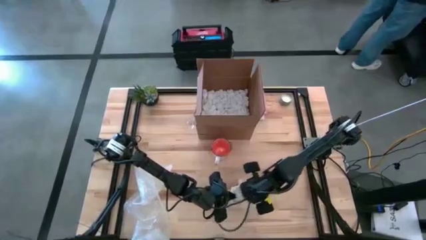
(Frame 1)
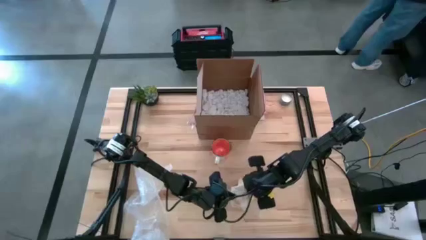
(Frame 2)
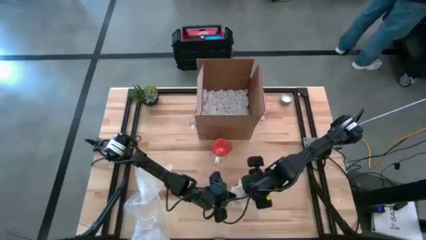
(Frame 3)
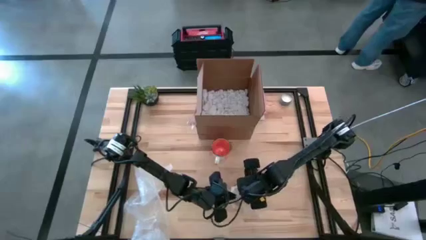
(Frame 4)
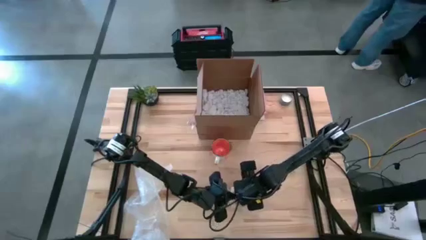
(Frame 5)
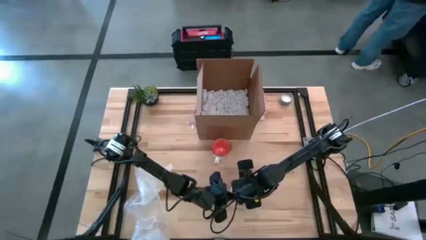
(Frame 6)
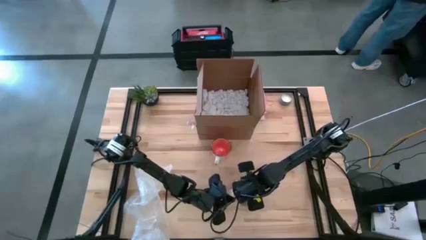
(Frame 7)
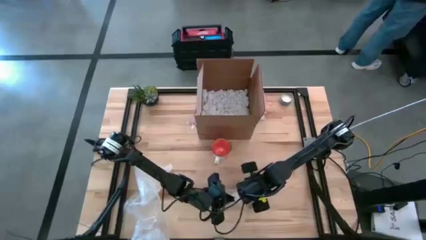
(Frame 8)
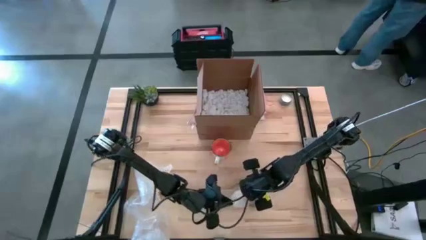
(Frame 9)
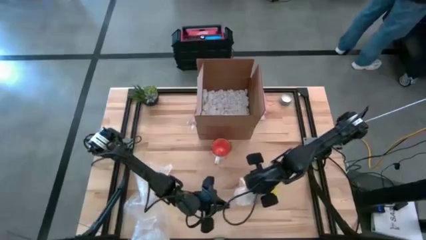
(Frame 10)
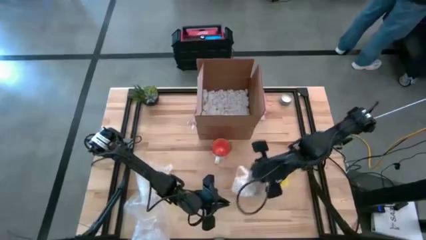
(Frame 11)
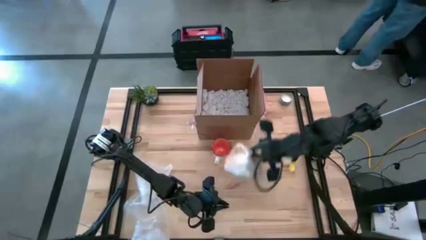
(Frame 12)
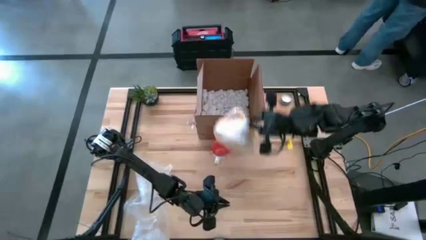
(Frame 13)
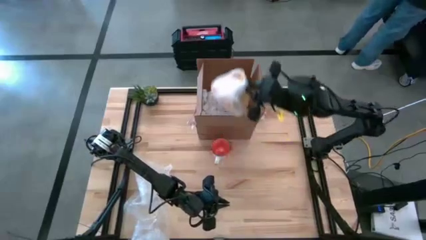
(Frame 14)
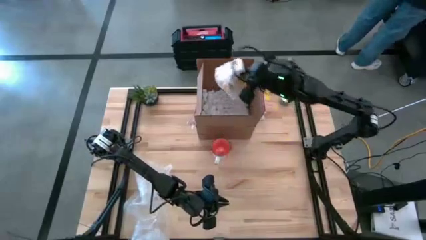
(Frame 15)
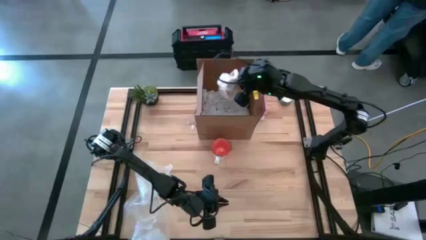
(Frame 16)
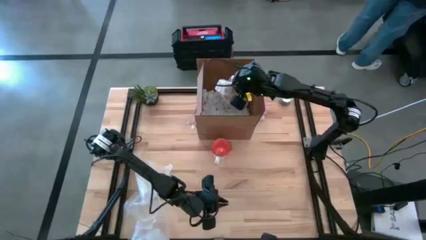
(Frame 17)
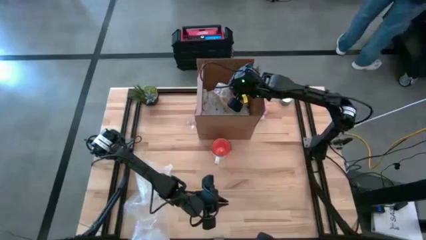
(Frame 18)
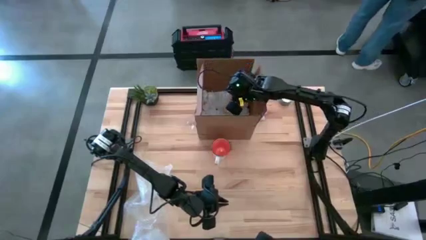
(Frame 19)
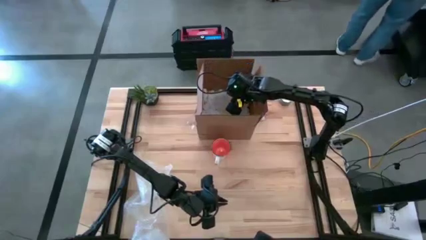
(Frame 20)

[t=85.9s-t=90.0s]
Task: wrap mug
Put the wrapped yellow mug into the cardboard box

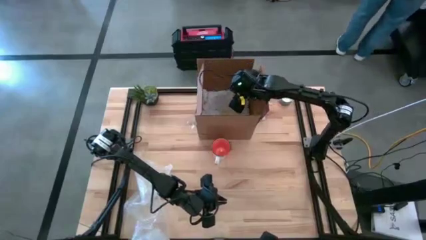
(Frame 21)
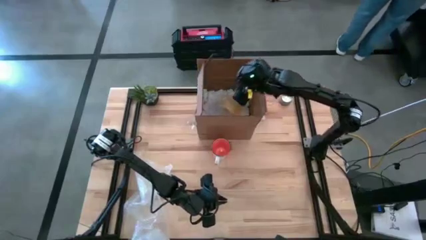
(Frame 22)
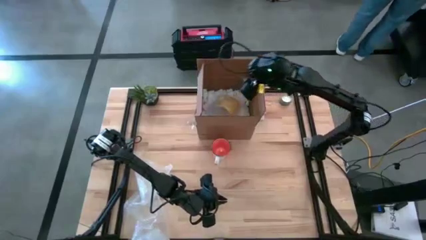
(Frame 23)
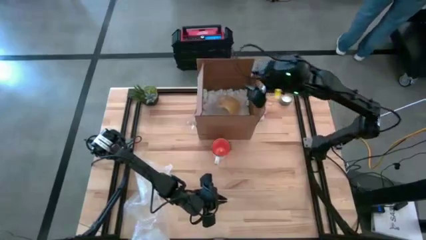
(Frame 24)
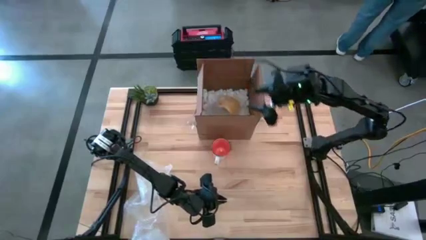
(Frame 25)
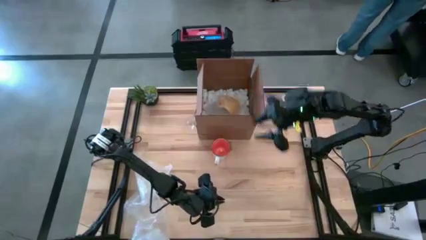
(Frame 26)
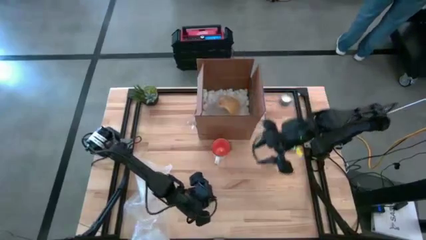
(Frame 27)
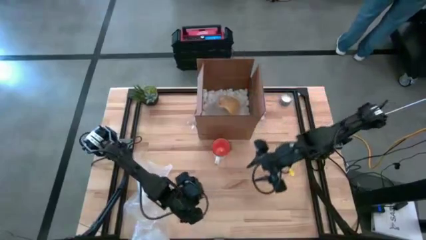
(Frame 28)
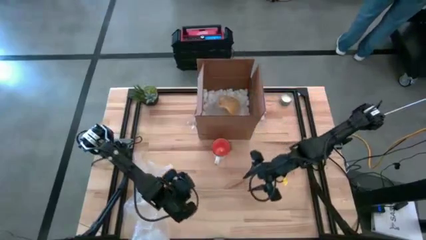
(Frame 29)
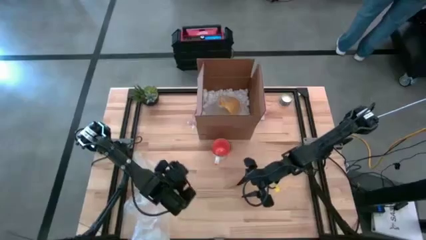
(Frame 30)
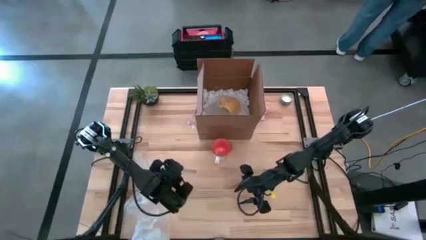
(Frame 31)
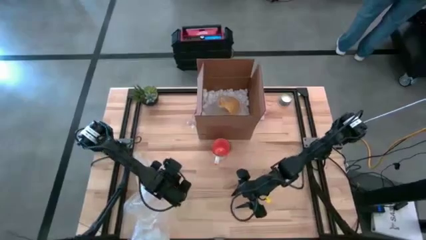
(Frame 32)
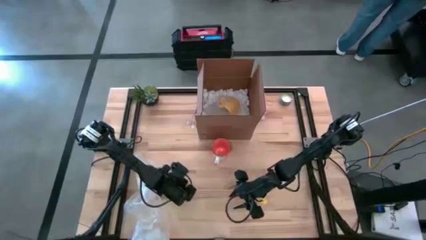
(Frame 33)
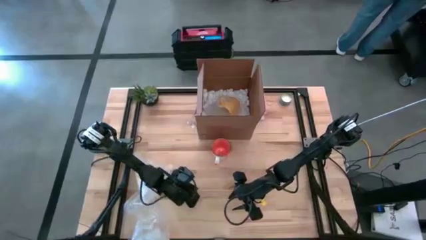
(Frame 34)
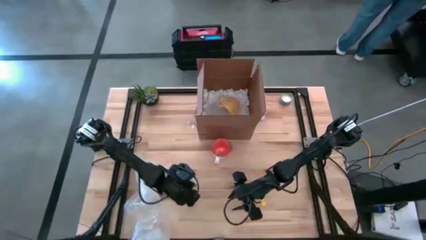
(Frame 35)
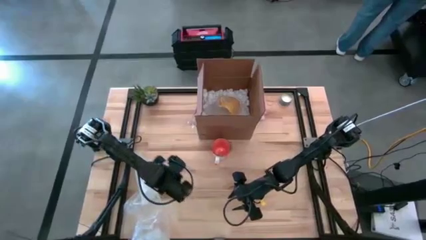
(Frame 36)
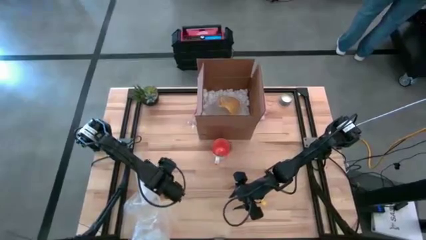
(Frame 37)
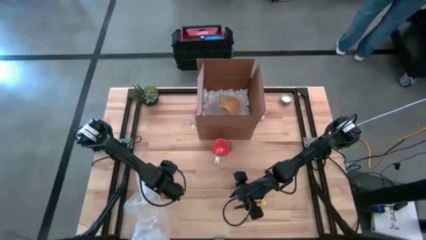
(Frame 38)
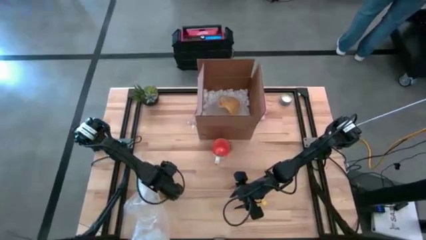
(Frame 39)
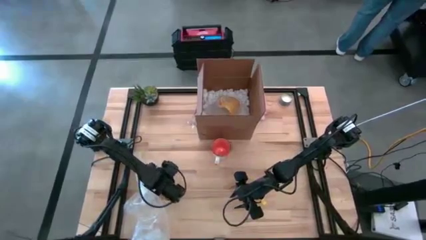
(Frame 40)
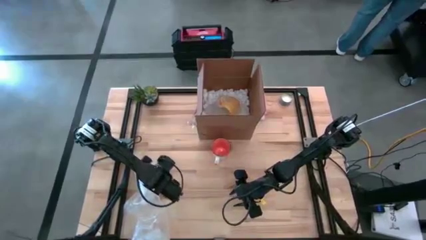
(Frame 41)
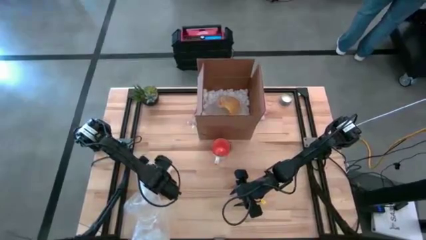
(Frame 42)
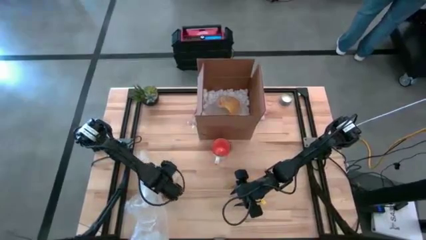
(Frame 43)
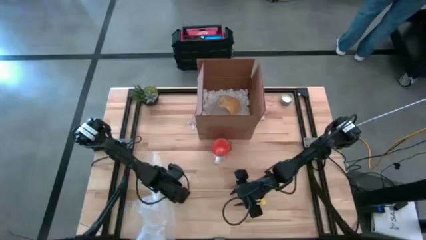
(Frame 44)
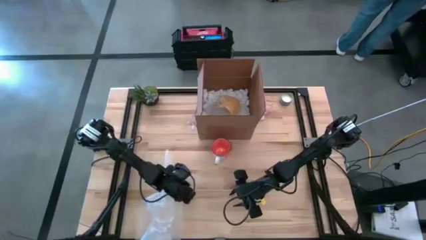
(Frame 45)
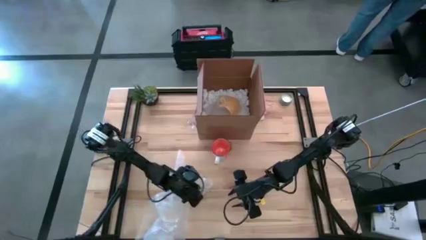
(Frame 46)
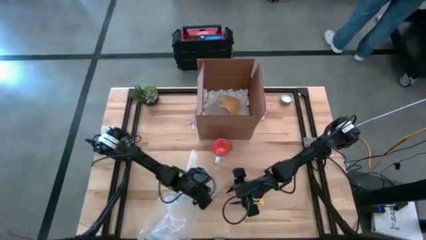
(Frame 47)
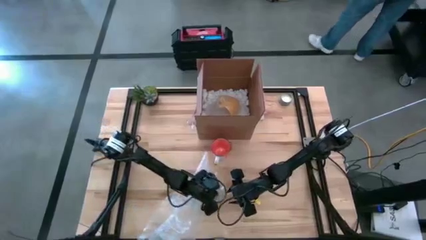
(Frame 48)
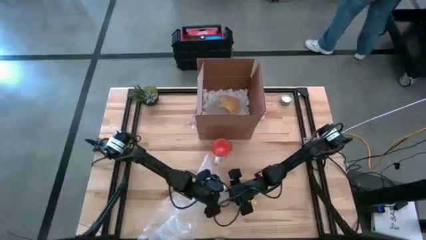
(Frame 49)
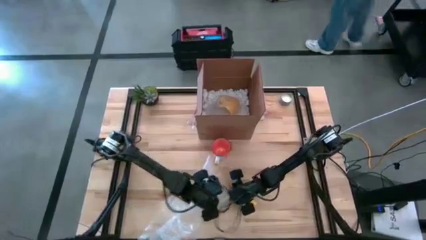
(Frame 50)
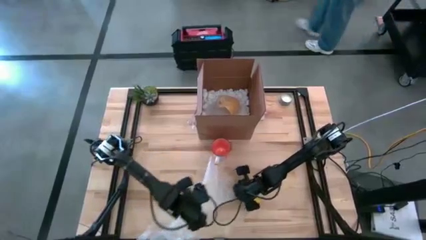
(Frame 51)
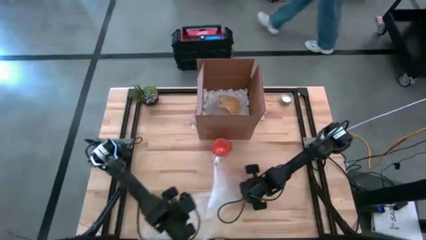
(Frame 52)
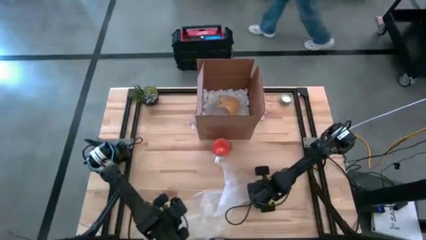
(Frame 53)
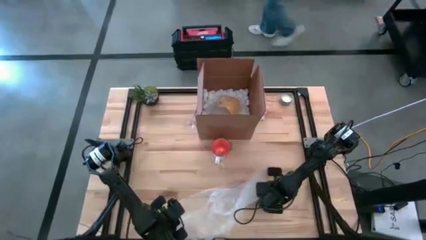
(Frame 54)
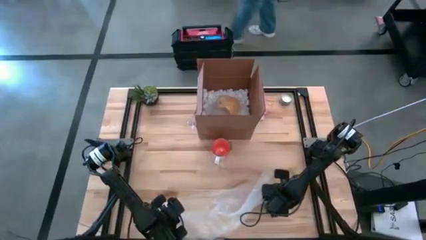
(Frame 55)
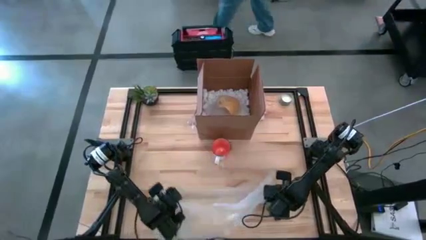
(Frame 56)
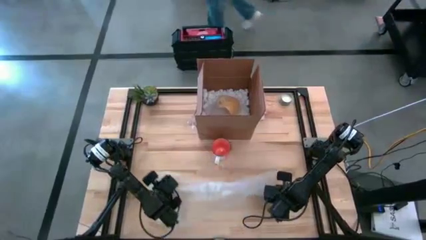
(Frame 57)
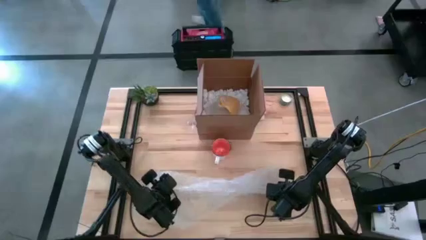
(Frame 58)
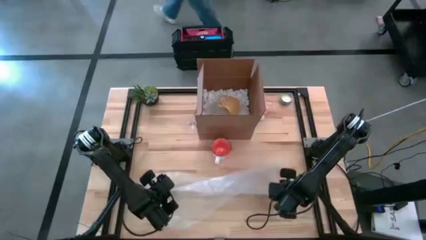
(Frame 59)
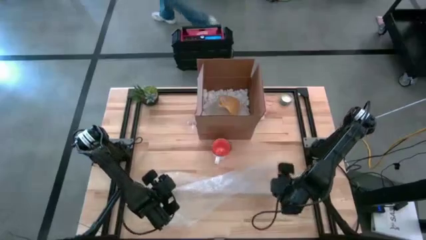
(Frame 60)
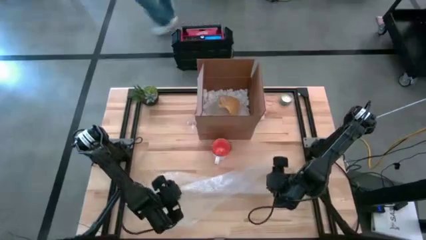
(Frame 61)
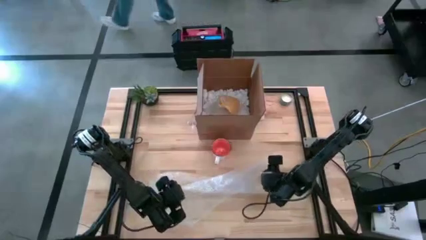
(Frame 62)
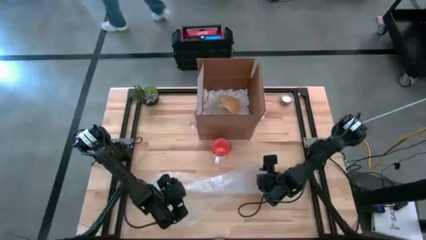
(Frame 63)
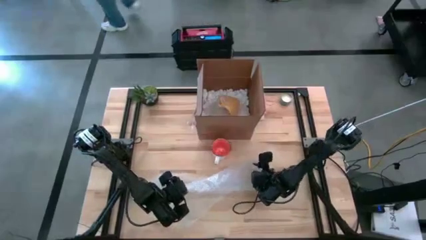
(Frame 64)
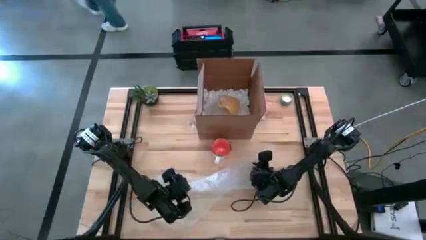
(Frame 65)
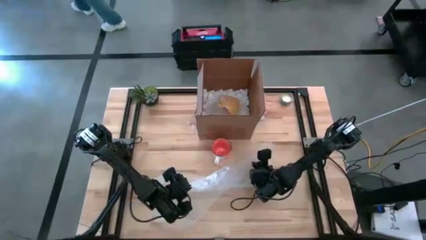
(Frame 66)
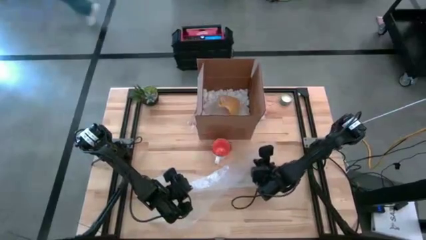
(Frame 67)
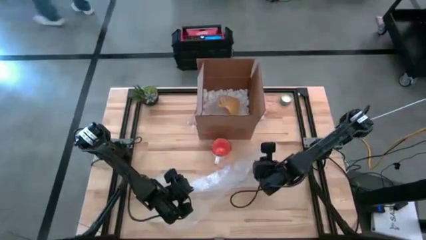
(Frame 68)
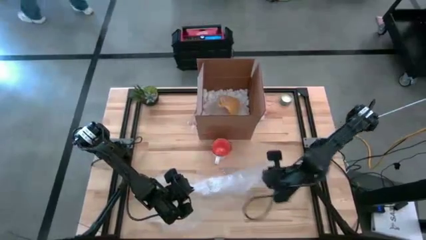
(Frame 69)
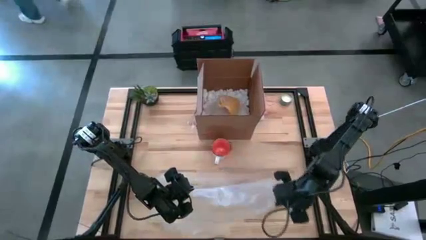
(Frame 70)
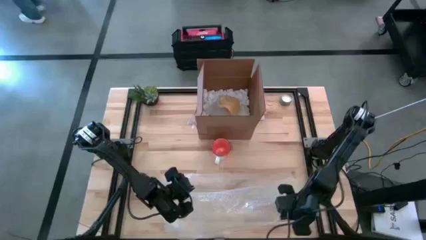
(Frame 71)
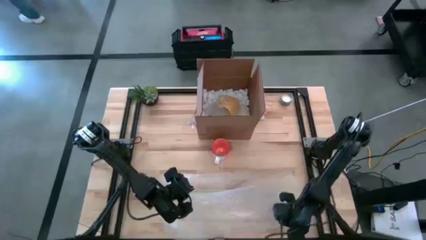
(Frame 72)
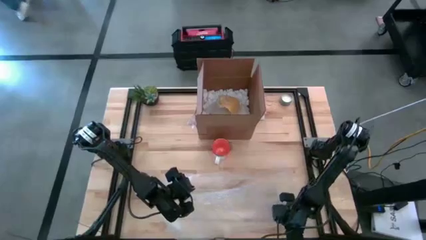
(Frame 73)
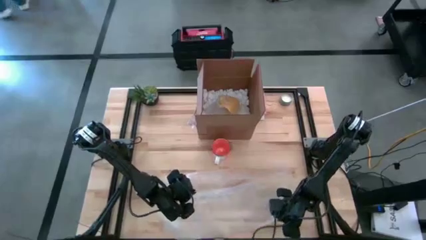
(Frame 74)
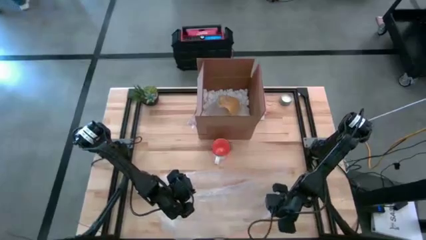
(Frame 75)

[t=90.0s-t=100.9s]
Prepare the transparent bubble wrap
